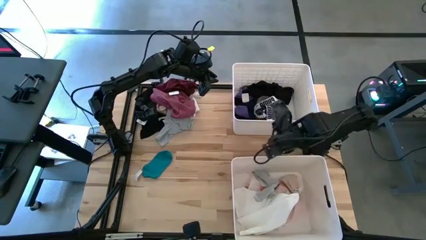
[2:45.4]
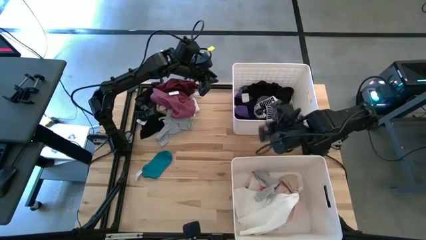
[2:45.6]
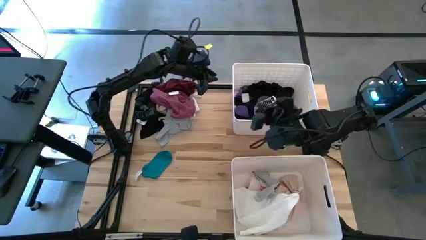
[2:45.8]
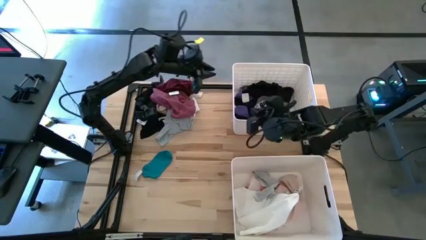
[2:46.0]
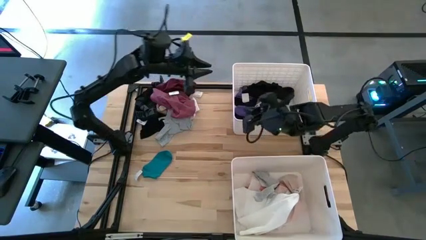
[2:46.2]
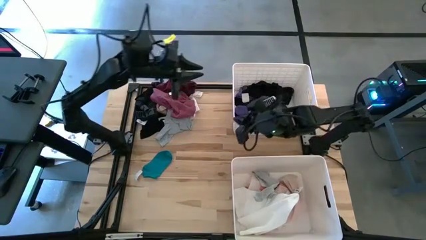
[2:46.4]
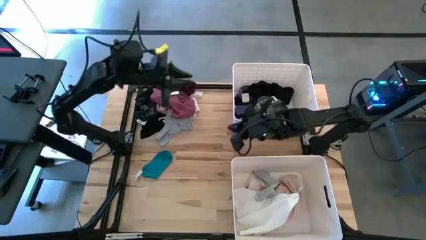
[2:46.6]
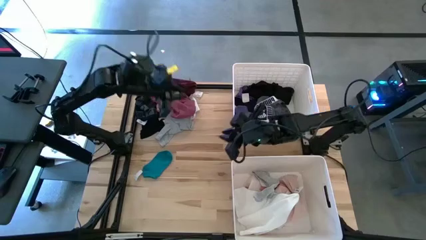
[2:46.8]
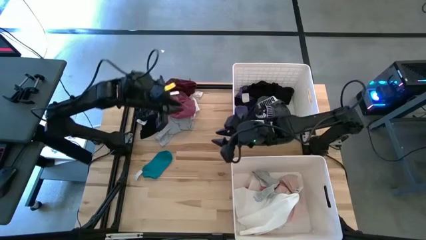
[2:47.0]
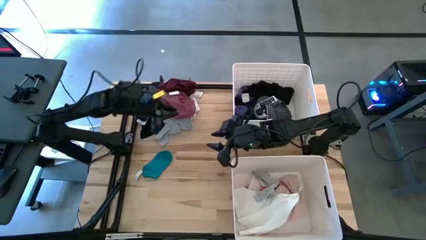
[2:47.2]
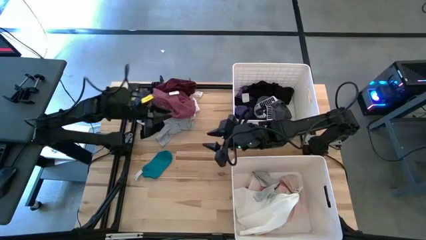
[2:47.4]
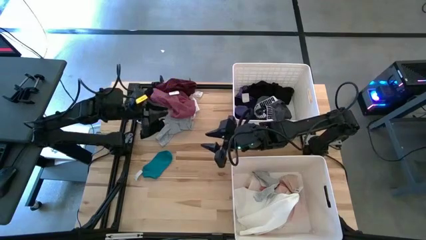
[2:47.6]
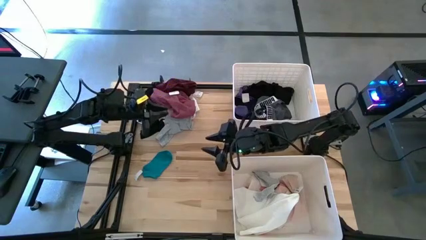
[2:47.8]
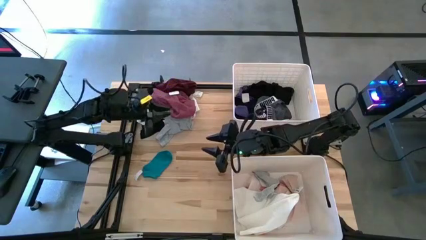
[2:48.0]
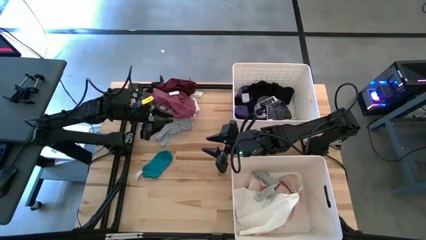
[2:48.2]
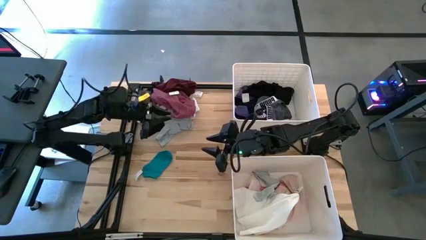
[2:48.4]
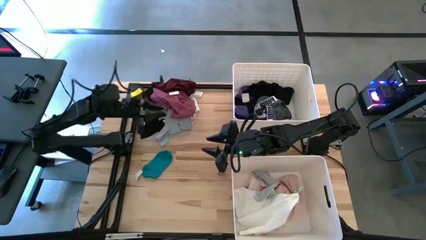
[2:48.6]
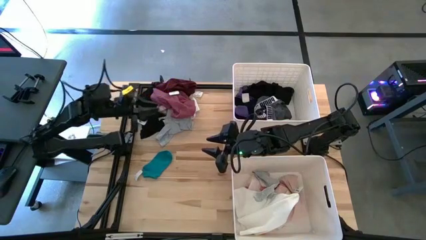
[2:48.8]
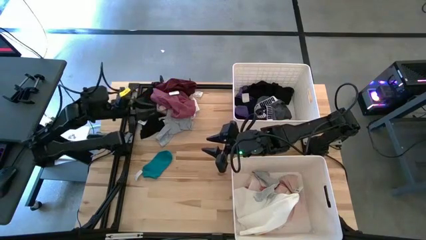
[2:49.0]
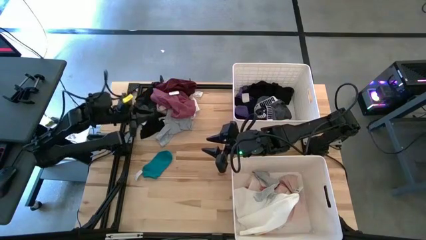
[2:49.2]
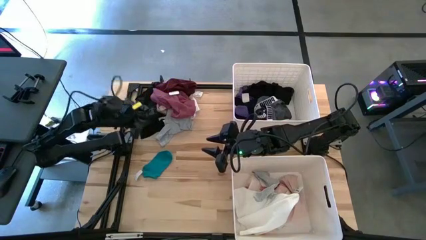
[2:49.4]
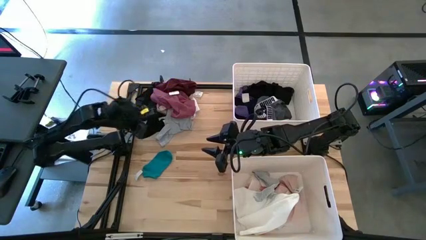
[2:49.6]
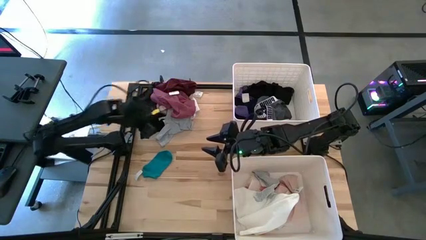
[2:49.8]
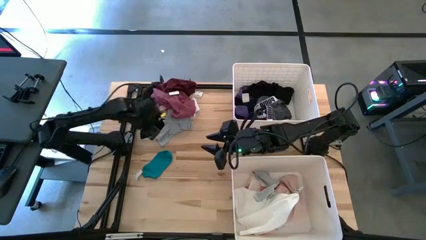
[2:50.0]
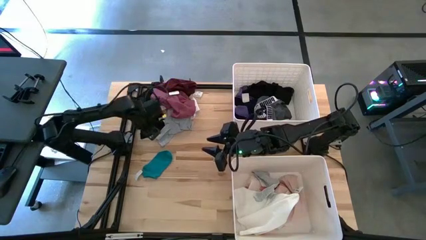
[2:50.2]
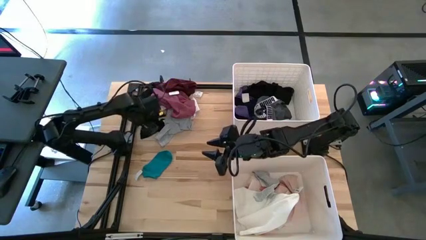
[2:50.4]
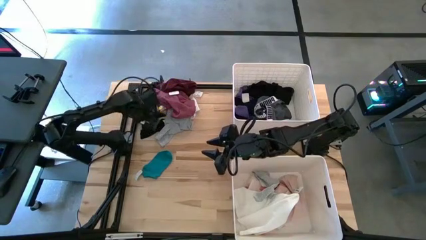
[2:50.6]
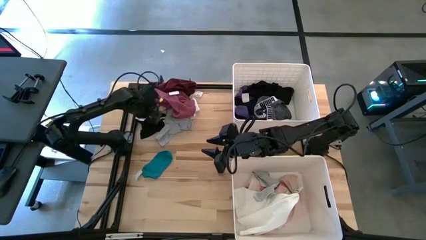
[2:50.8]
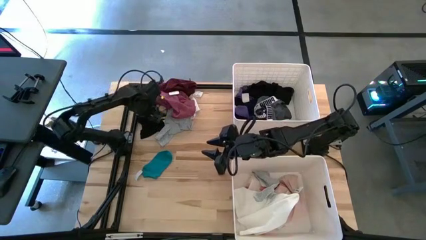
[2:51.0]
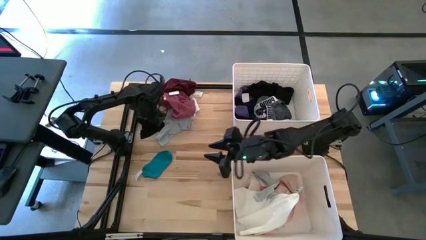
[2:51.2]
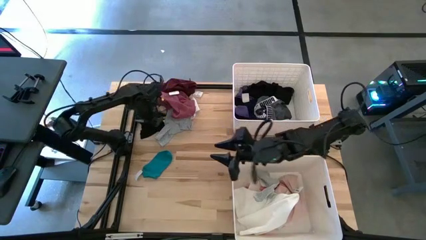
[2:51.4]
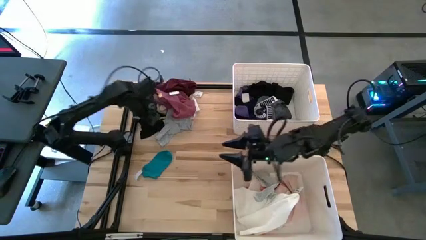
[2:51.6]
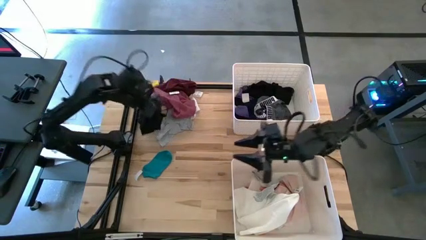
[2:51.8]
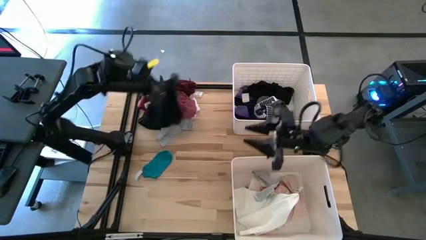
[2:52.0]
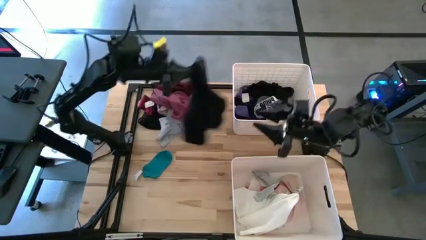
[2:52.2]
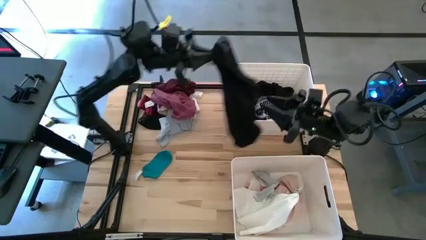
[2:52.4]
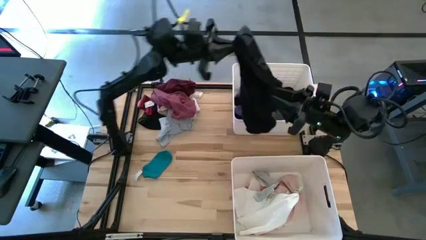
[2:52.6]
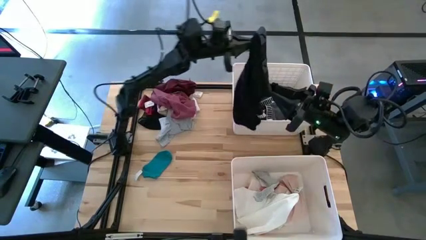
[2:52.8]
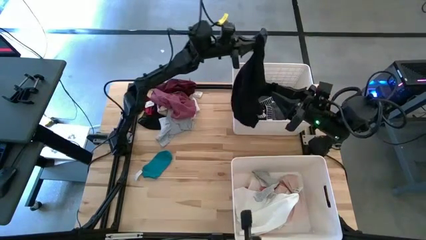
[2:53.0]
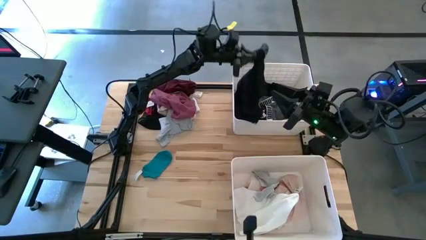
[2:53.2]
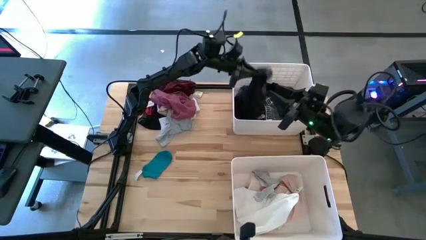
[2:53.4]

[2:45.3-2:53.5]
Task: Sort clothes
Put the black shorts into the top bin

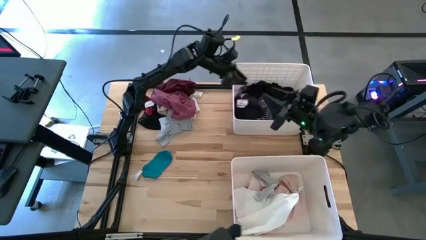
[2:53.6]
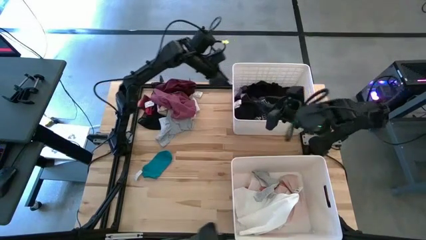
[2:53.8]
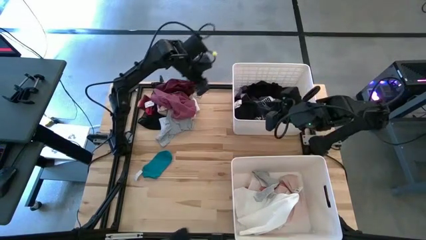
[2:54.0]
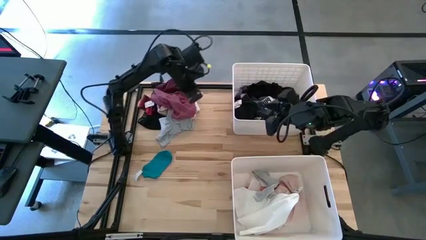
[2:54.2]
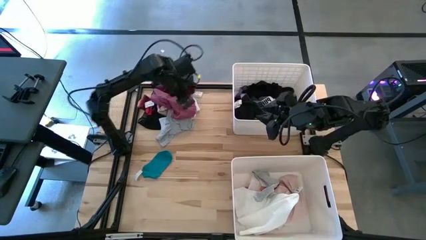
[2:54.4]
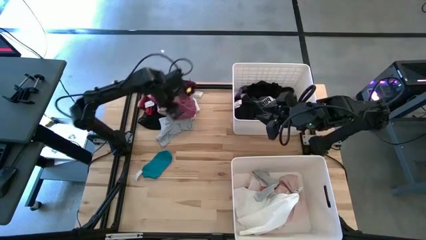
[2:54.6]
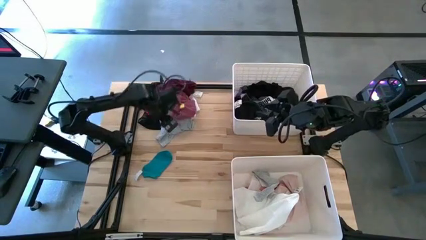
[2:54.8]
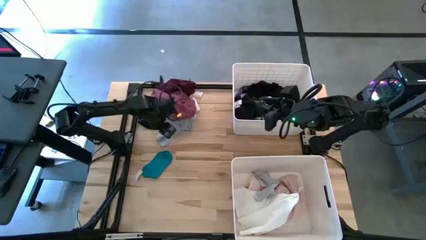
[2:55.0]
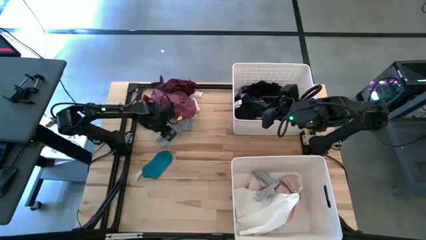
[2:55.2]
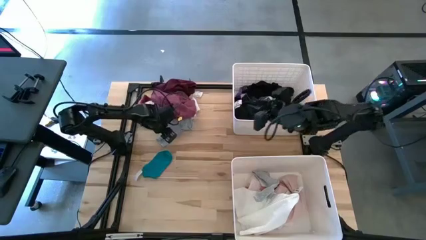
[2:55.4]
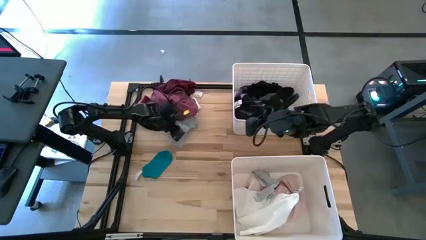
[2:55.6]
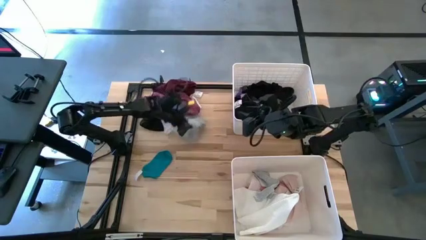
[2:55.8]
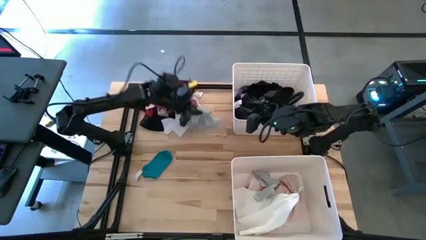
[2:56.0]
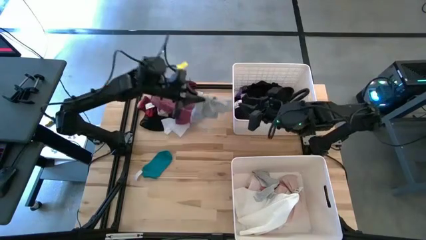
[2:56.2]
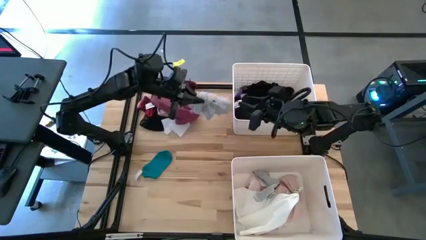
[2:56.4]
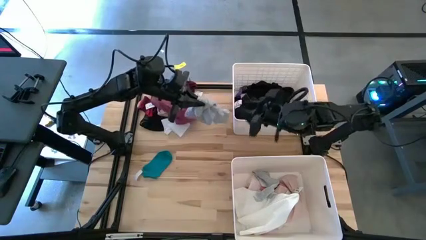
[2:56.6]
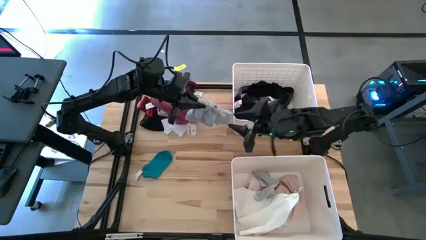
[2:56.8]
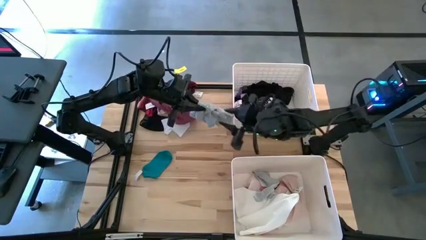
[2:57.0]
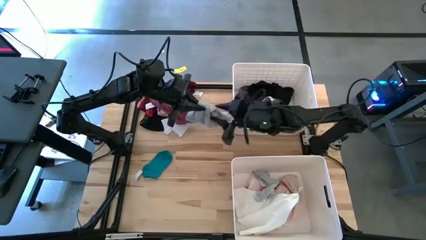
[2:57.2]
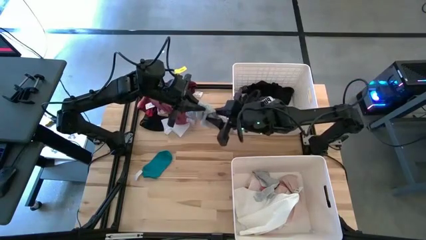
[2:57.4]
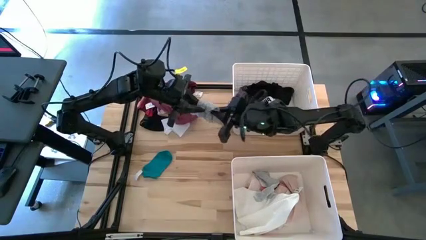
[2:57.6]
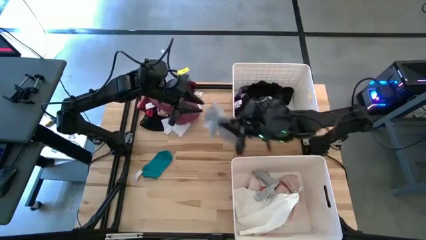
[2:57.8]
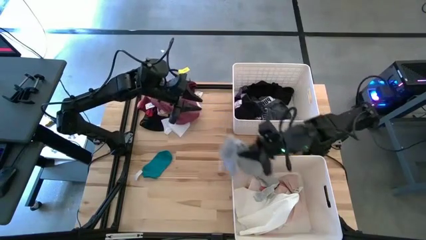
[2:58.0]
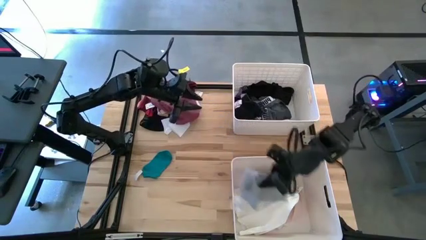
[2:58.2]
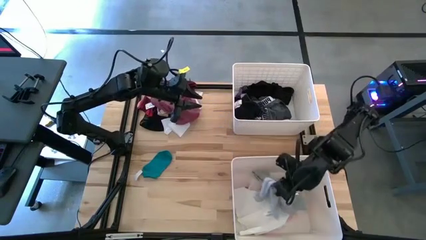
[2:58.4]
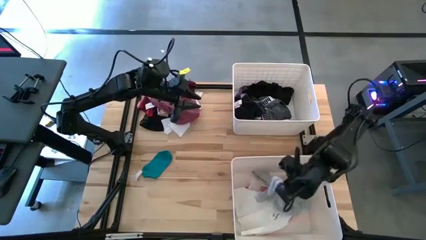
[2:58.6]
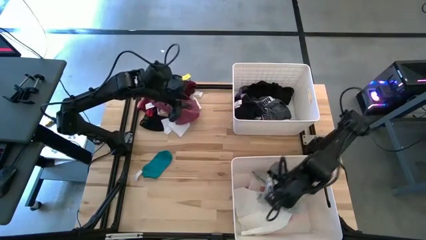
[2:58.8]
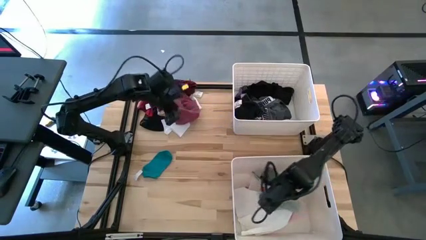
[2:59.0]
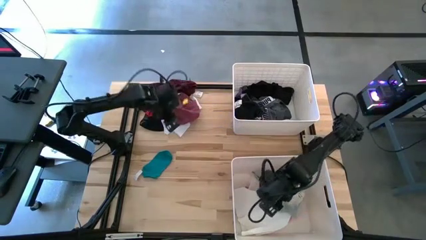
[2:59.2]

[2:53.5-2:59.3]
Put the grey shirt into the bottom bin
